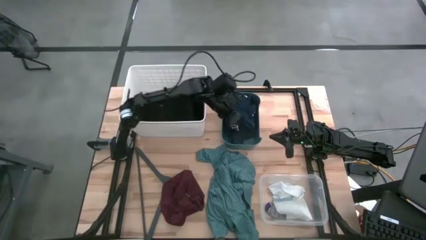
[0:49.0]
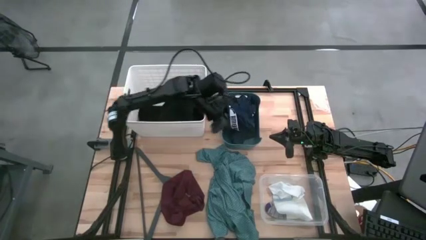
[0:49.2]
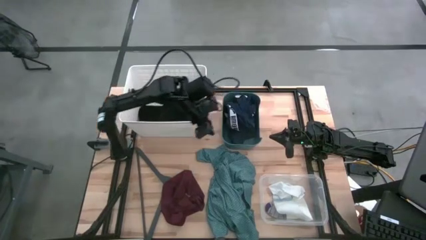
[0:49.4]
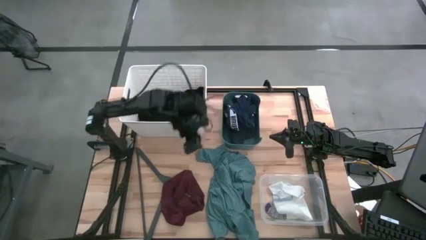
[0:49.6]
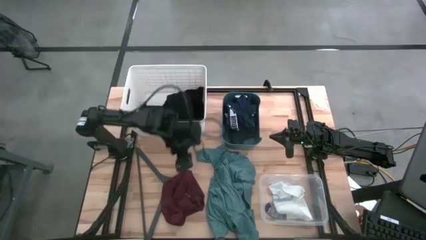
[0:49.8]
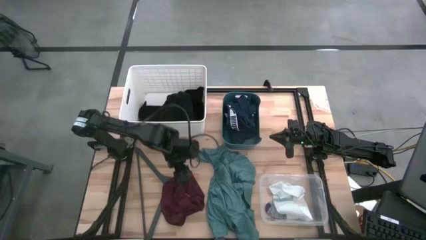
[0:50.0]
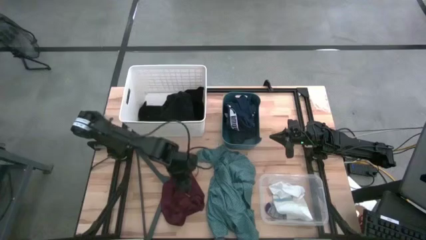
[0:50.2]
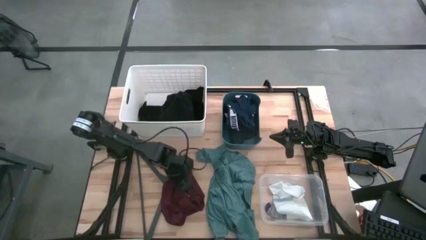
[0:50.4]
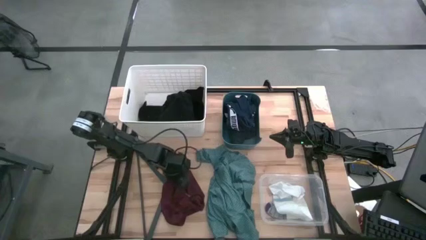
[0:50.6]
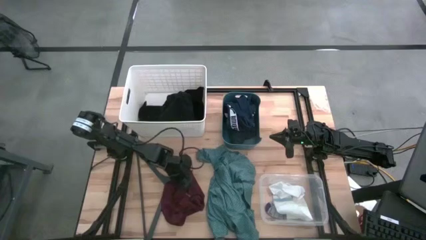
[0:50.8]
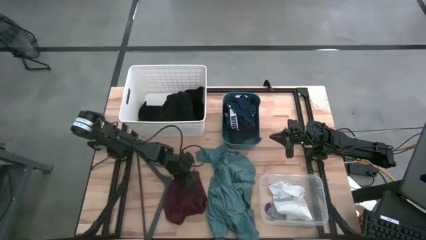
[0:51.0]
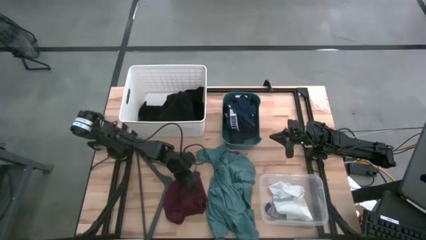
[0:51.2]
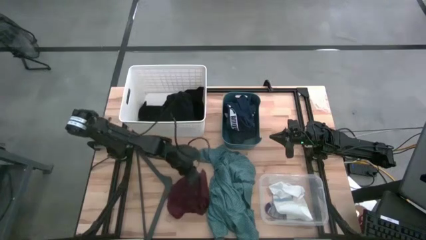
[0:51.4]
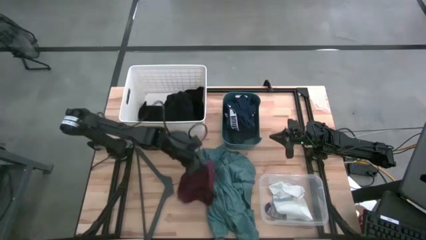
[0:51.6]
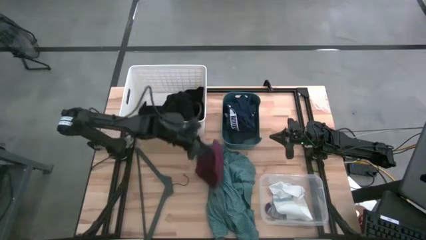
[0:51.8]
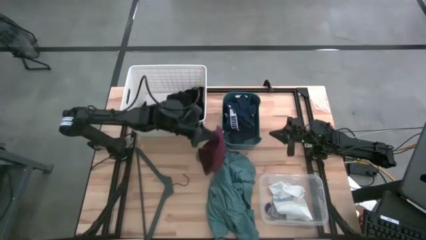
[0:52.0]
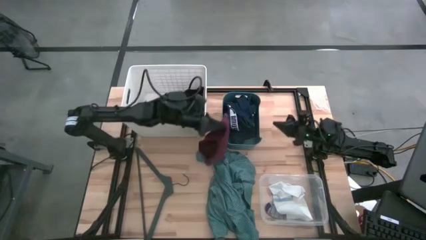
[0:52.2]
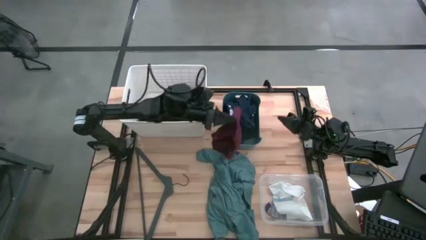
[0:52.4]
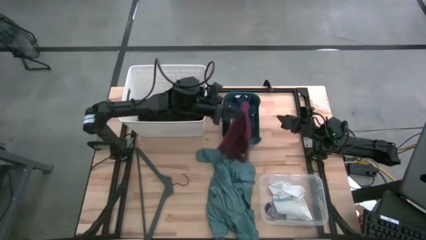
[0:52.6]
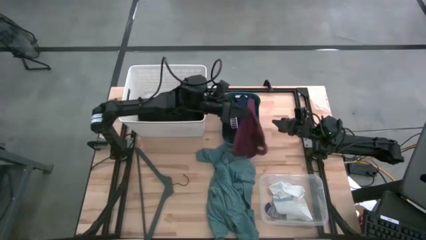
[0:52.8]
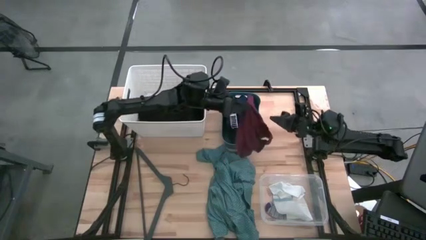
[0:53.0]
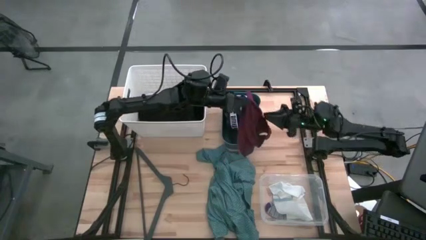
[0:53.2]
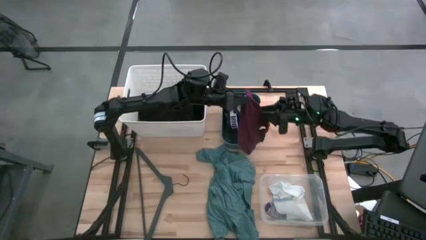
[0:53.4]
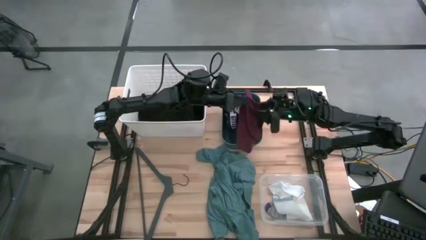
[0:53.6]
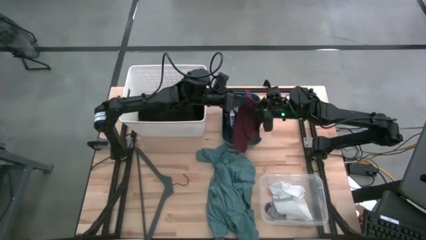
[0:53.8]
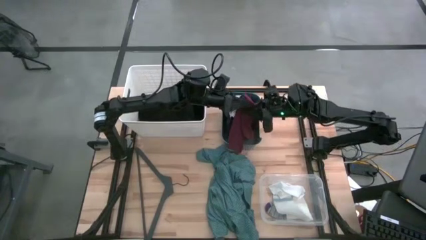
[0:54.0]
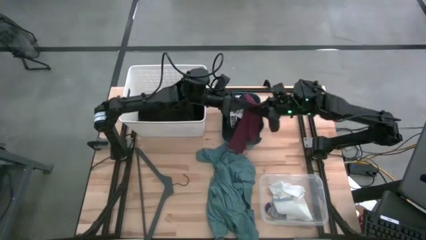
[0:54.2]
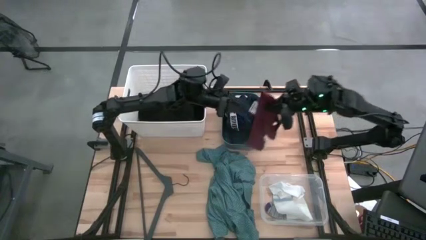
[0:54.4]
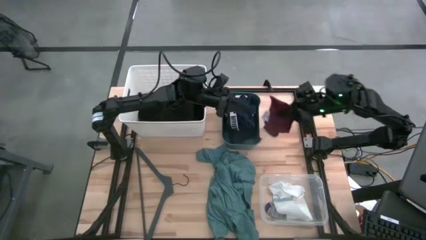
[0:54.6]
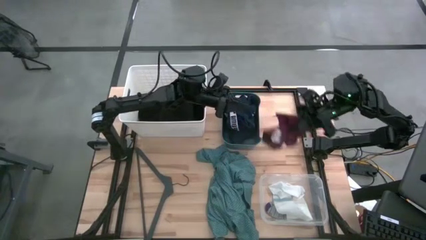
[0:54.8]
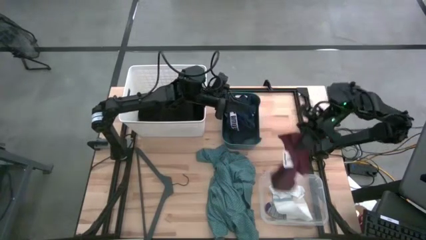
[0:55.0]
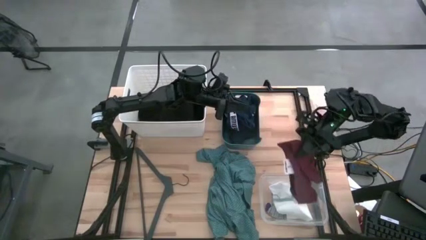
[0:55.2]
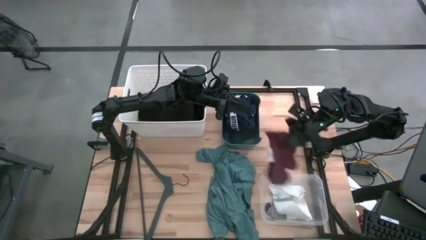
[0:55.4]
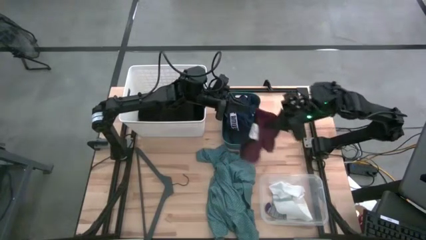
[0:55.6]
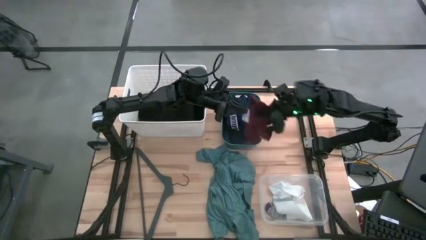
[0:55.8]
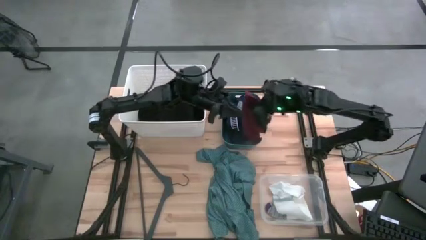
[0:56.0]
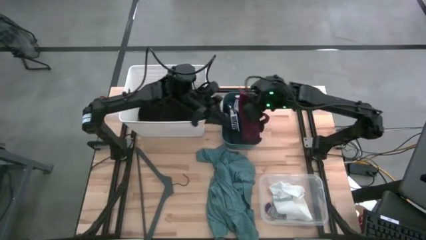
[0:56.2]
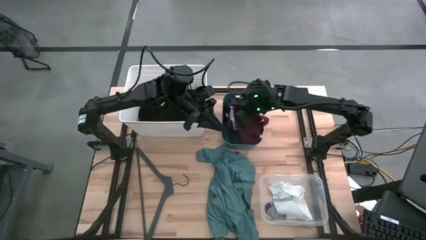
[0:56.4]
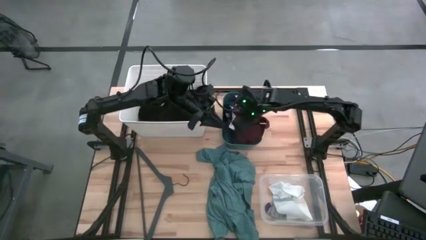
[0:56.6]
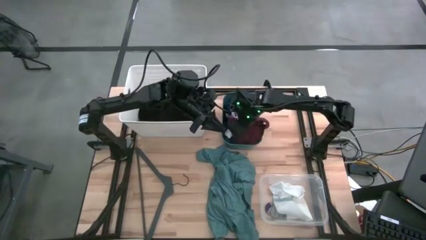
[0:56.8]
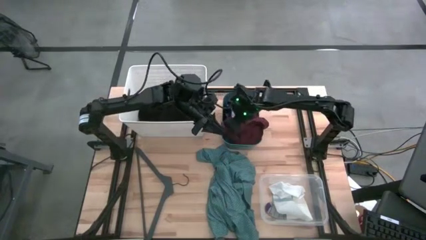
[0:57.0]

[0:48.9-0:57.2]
Task: Pick & Place Cloths
Put the red shirt into the blue bin

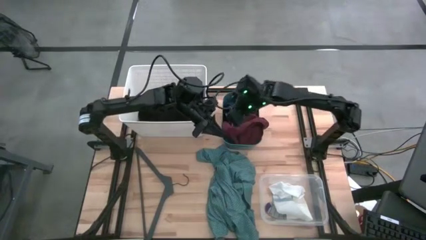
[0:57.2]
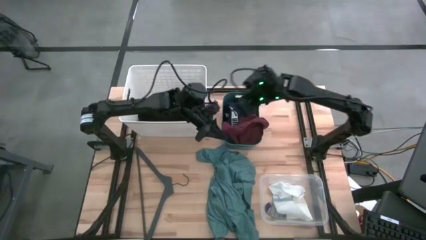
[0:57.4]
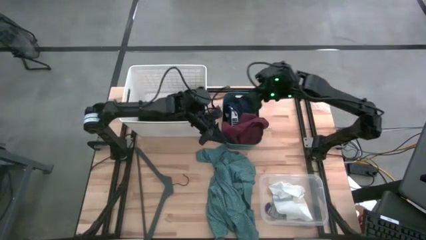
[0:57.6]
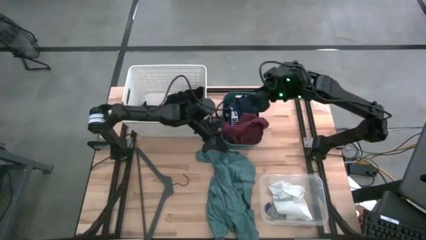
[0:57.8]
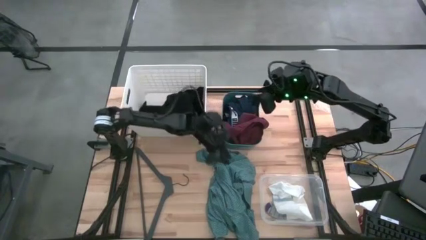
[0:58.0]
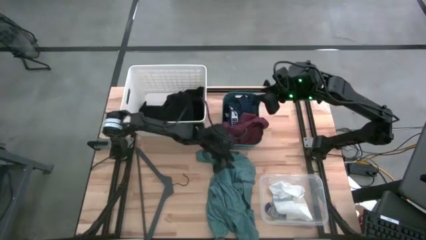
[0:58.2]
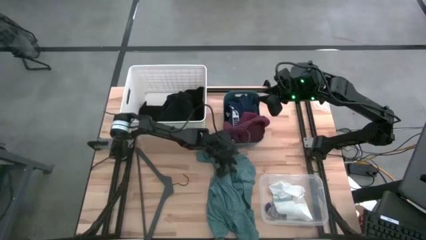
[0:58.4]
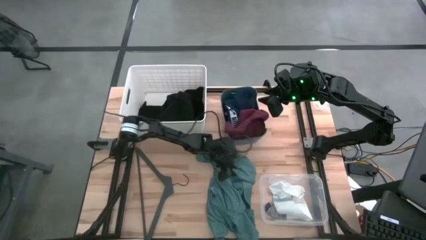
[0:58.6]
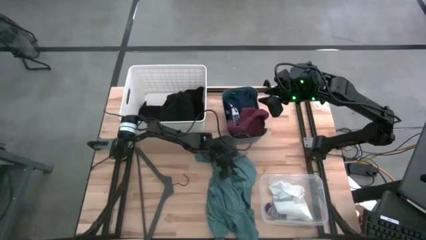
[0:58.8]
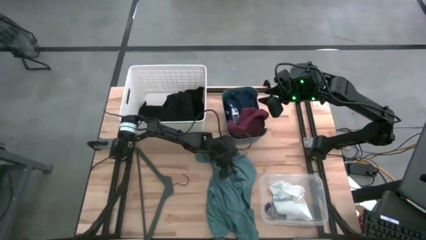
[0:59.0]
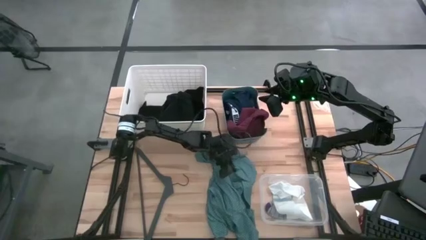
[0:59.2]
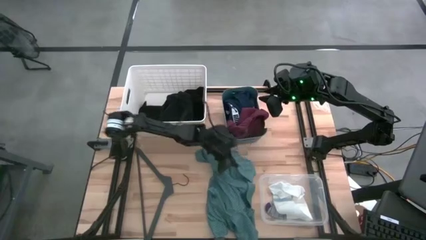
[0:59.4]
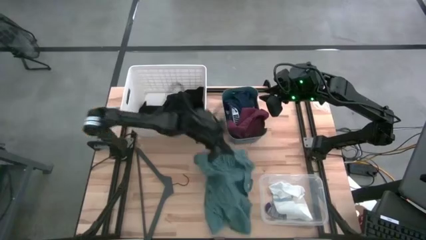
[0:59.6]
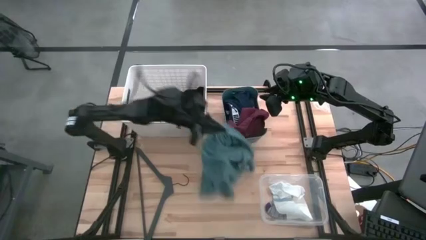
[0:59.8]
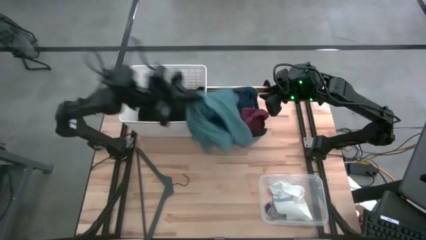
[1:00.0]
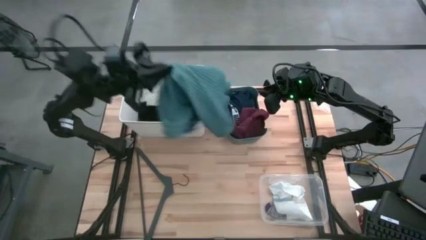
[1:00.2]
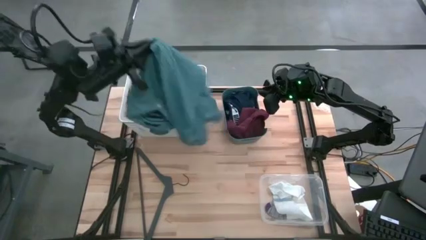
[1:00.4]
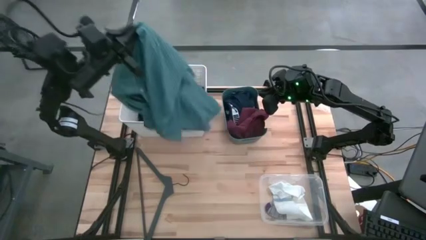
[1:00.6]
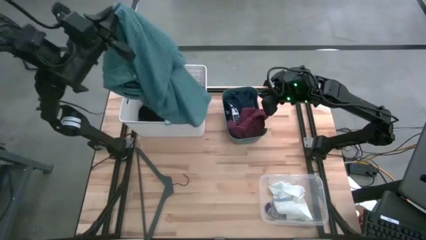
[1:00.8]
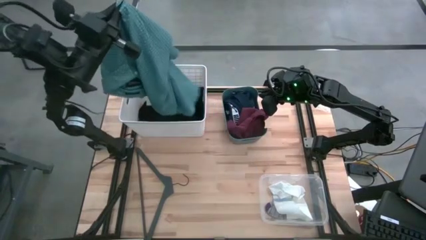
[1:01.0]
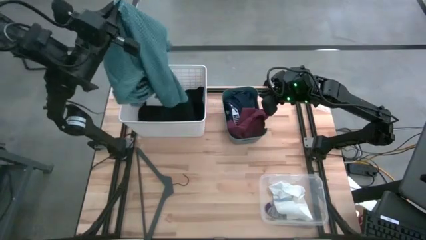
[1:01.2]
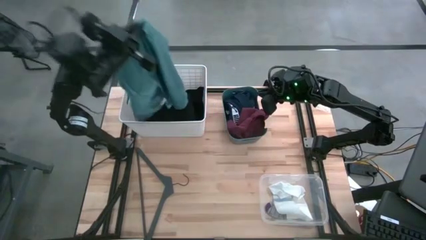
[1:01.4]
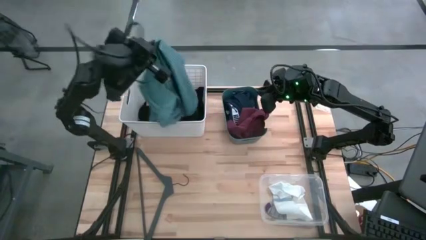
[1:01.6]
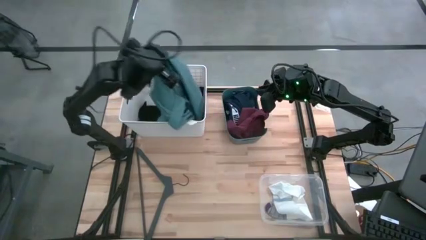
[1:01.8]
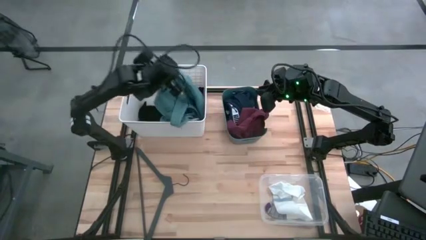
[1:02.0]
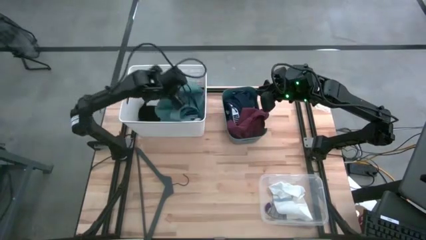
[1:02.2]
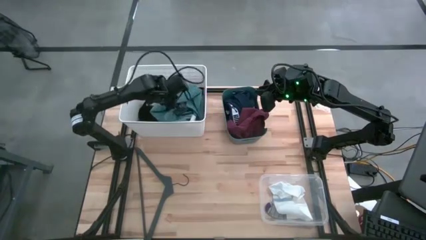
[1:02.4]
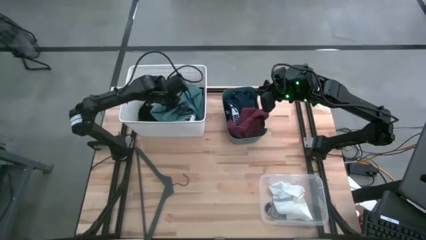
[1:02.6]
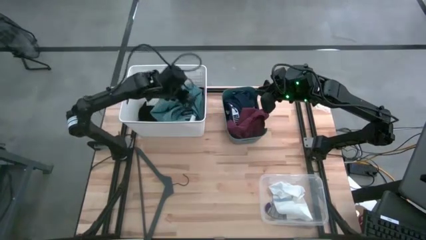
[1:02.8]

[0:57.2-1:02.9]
Put the blue polo into the white basket

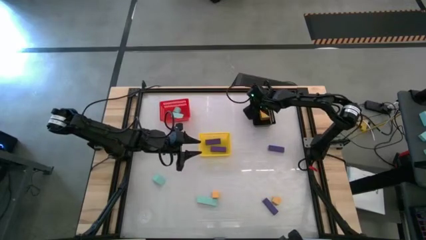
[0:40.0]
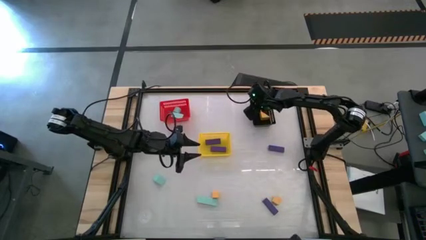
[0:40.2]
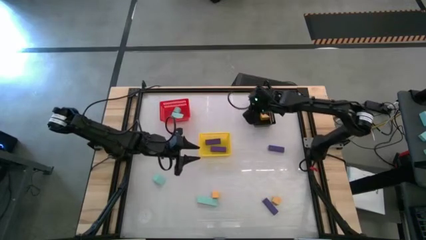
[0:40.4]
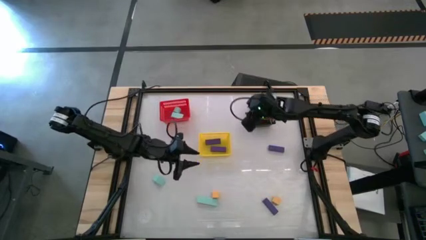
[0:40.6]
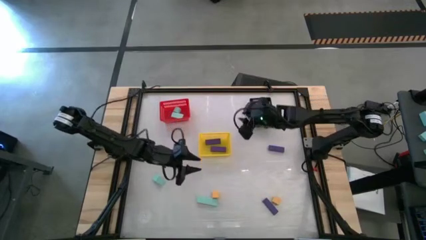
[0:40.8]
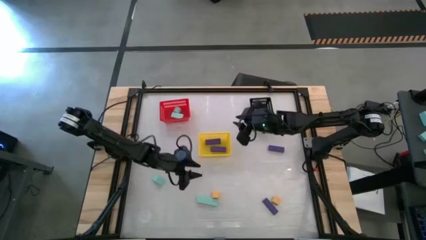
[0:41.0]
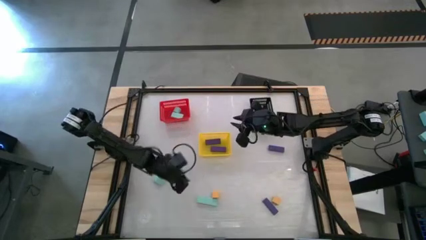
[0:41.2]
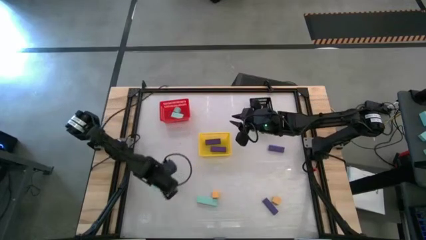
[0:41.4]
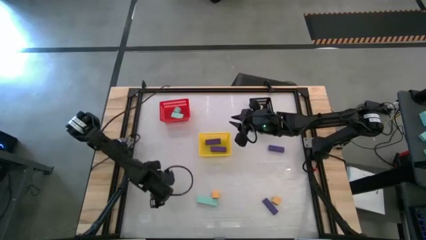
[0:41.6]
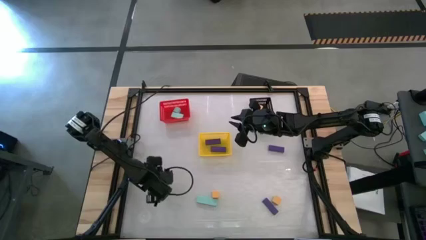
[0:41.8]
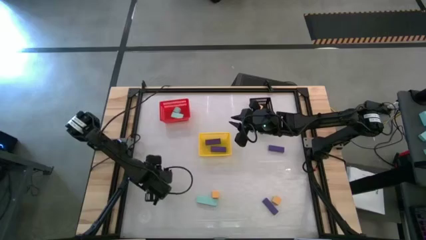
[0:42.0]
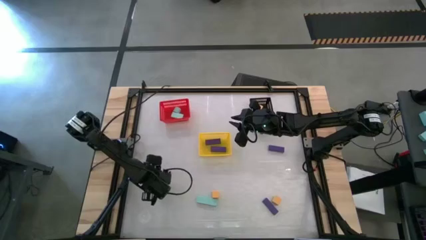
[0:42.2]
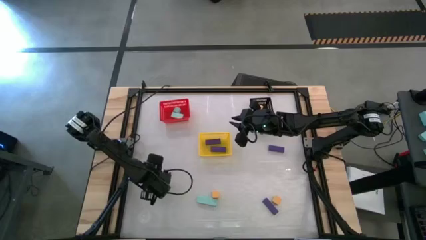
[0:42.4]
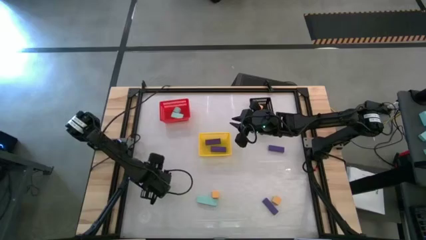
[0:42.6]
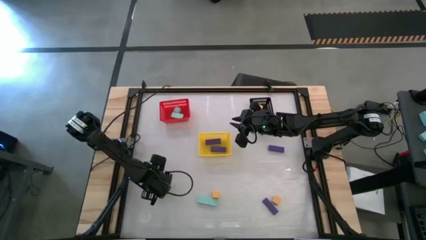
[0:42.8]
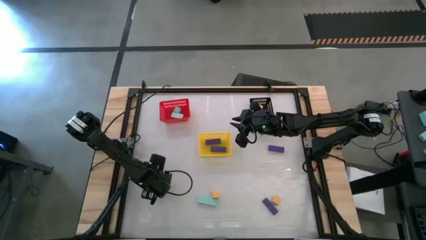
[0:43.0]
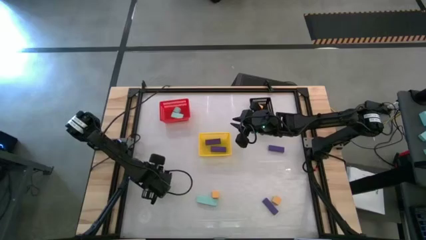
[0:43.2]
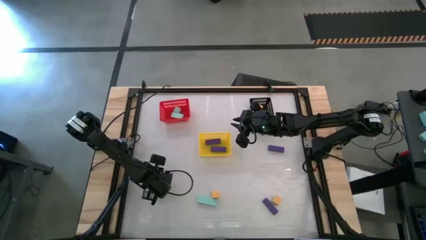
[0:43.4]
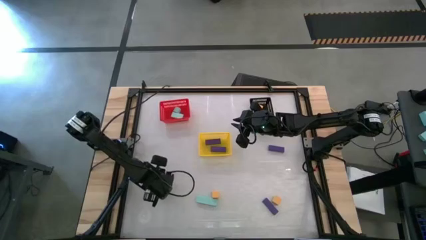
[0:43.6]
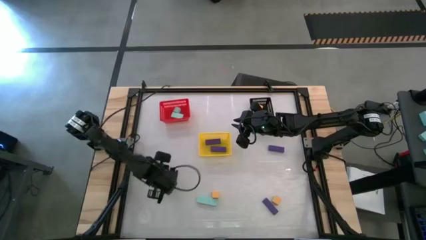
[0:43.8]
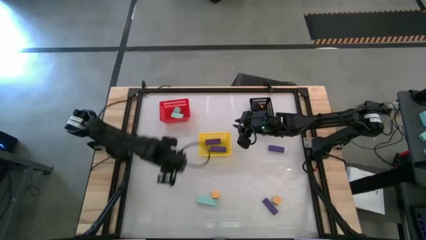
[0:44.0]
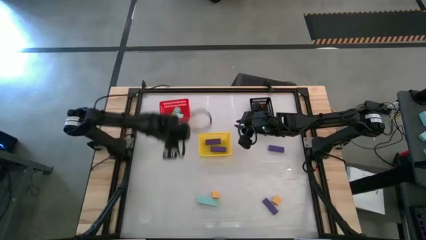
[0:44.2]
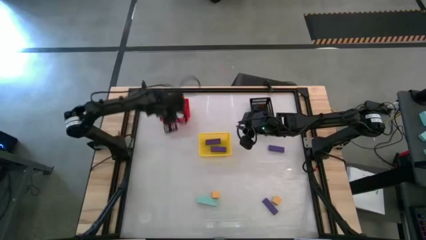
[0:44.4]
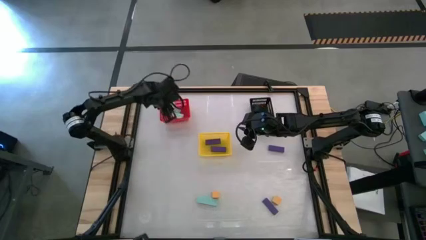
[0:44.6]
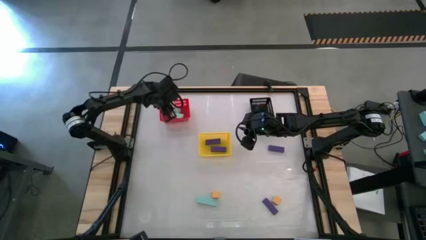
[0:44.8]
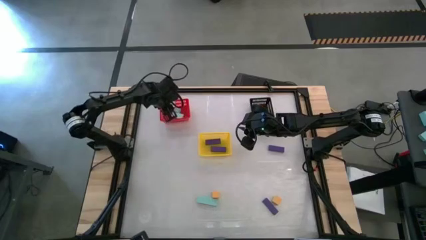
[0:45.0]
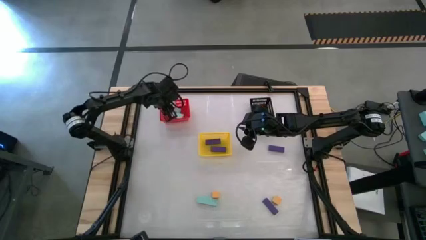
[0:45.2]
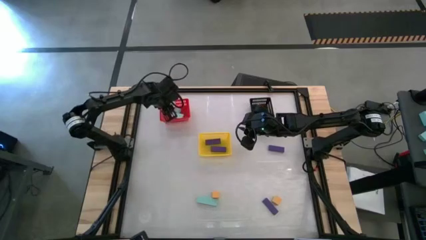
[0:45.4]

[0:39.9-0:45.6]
Task: Sort & place blocks by color
Put the light blue block into the red bin
